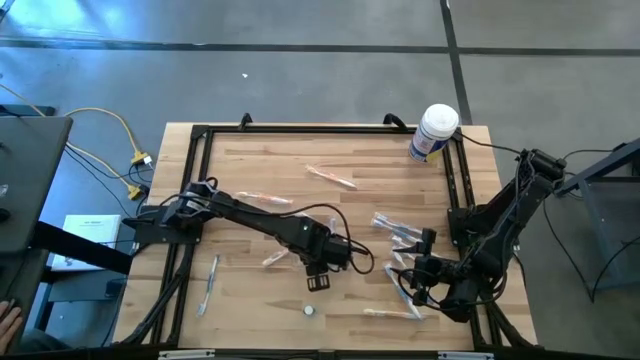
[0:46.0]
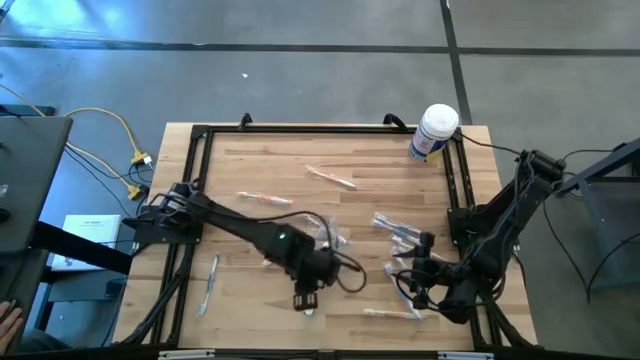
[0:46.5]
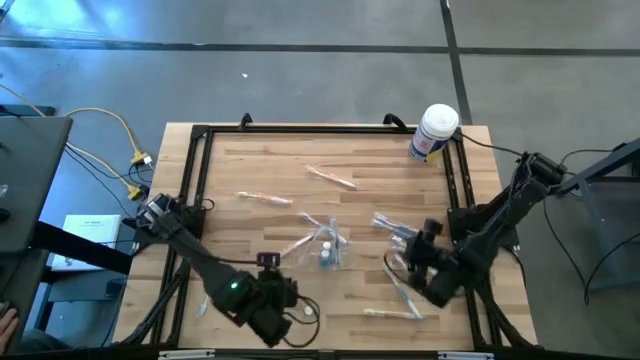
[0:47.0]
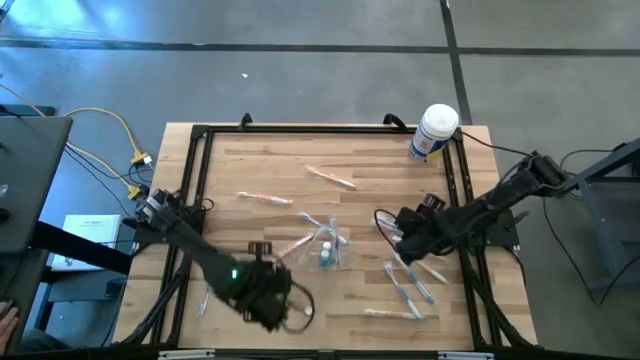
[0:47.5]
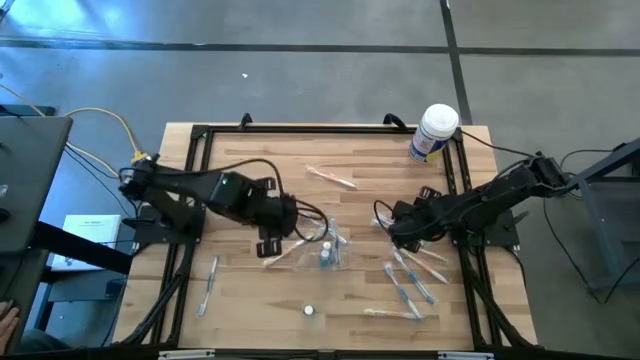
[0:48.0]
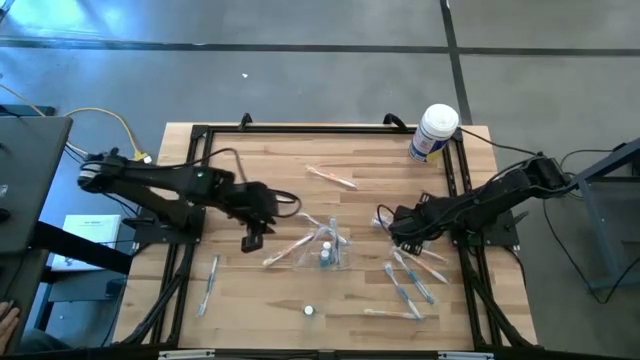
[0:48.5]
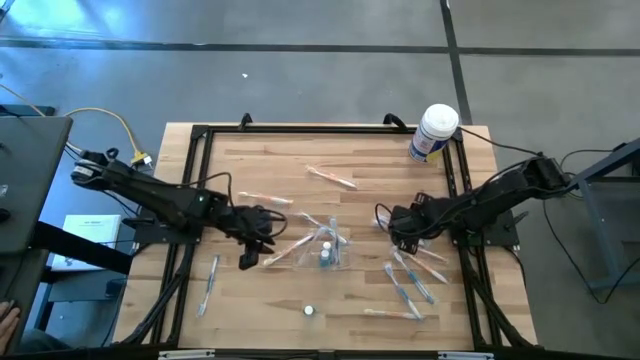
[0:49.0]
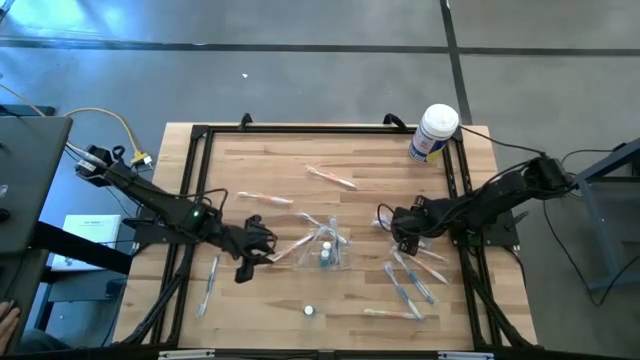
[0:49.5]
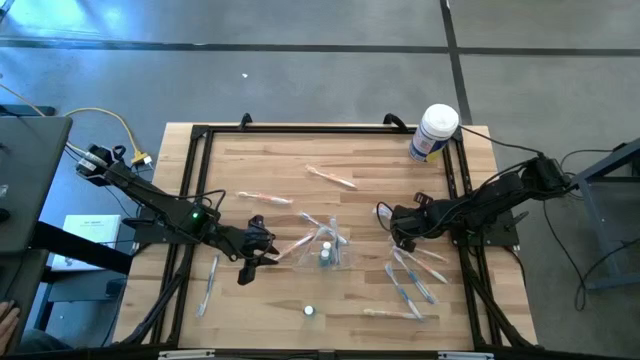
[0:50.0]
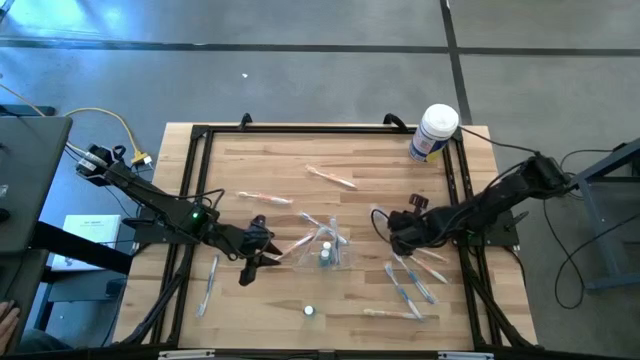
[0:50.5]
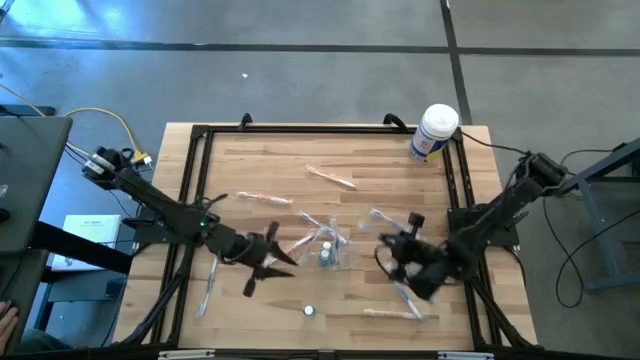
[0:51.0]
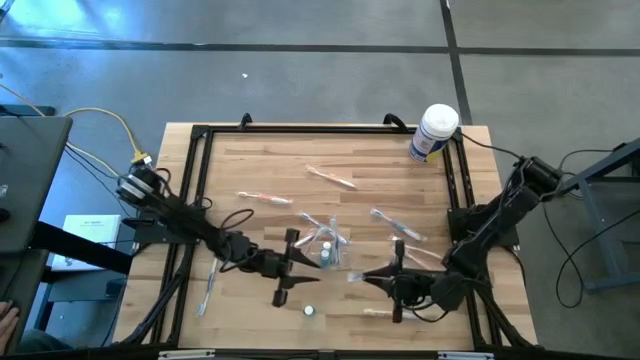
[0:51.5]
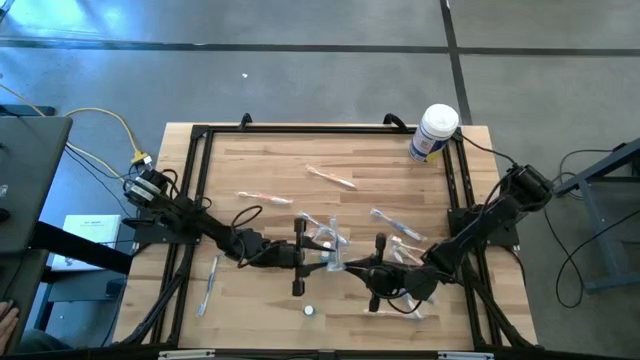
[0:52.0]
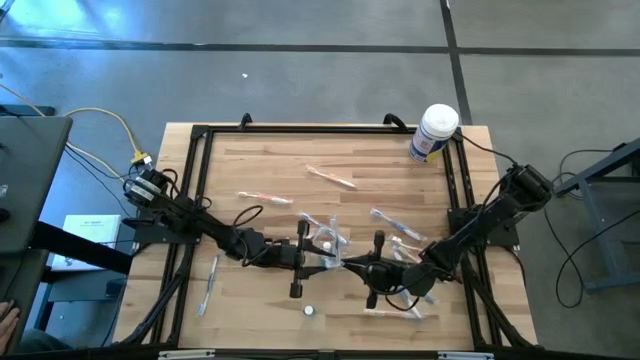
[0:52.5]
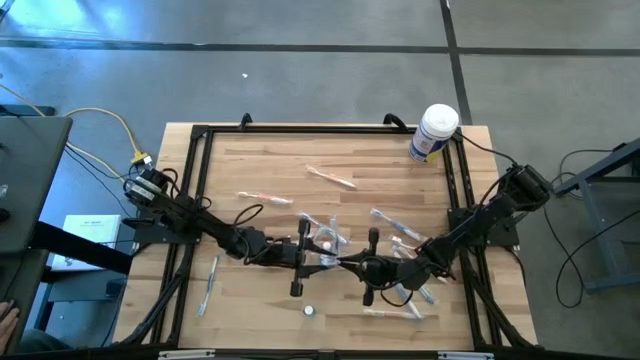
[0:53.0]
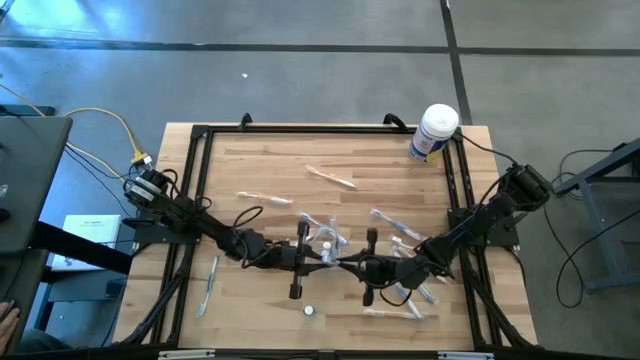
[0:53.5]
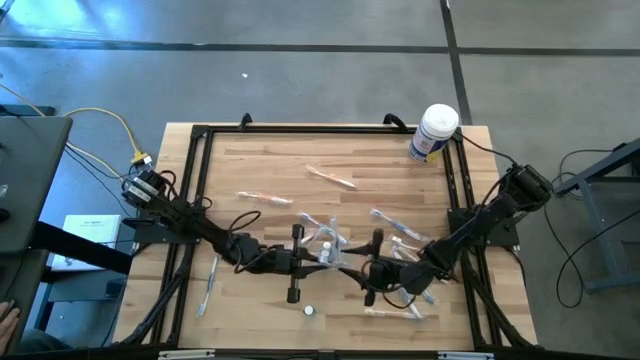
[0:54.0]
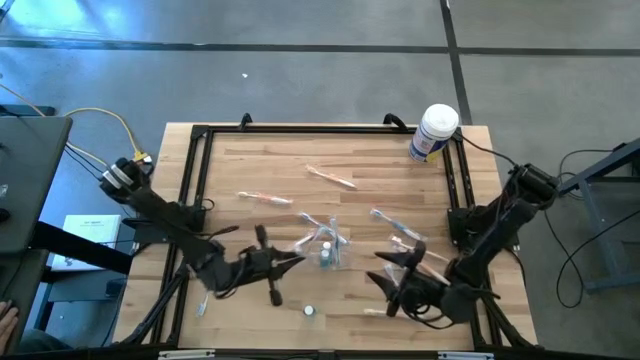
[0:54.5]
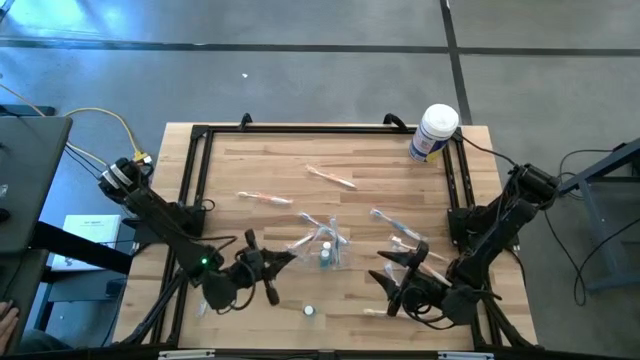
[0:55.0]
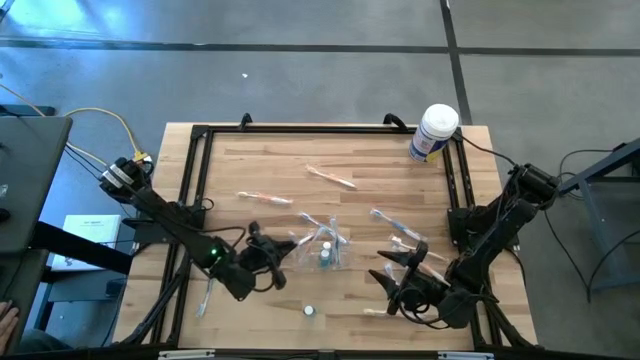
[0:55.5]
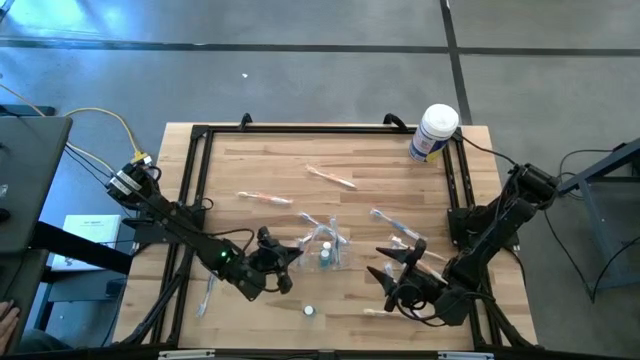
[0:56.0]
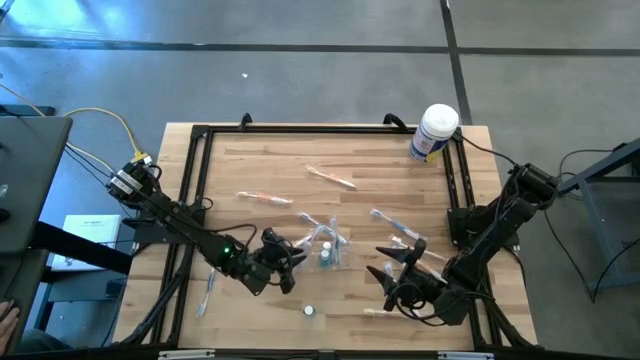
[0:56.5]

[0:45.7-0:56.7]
Task: Pick & Place toothbrushing station
Put the blue toothbrush into the transparent organizer

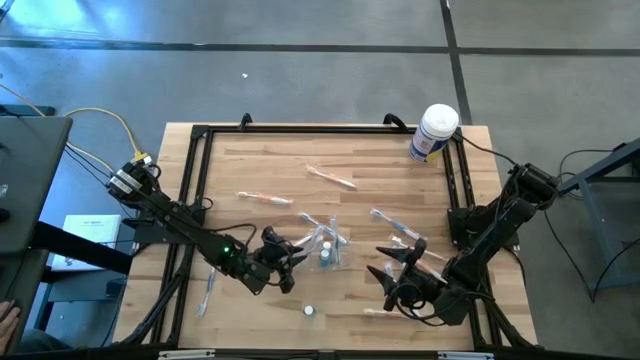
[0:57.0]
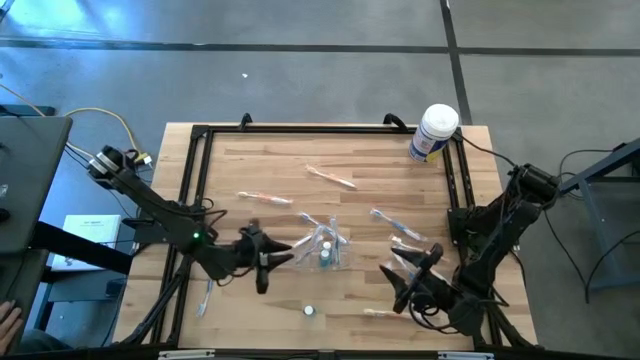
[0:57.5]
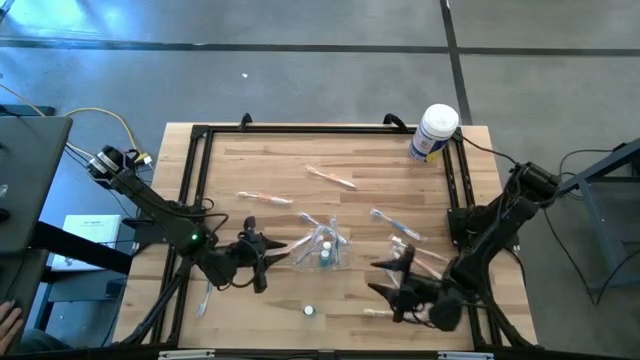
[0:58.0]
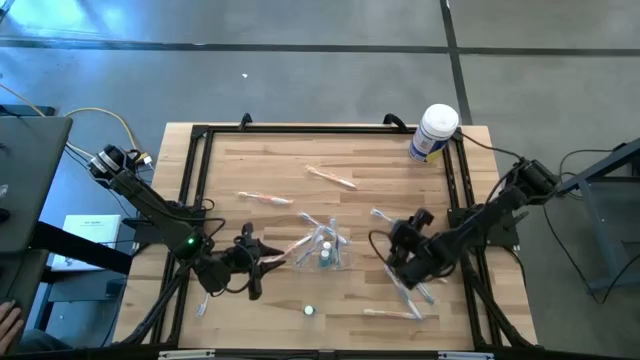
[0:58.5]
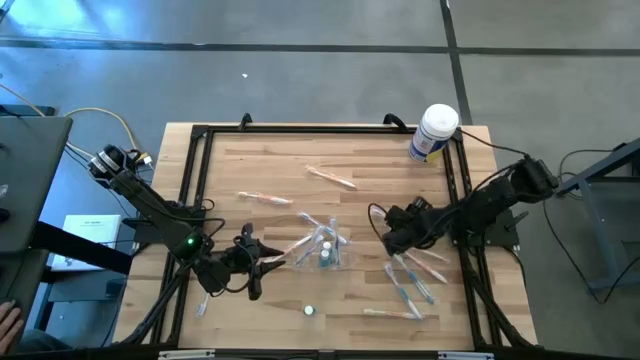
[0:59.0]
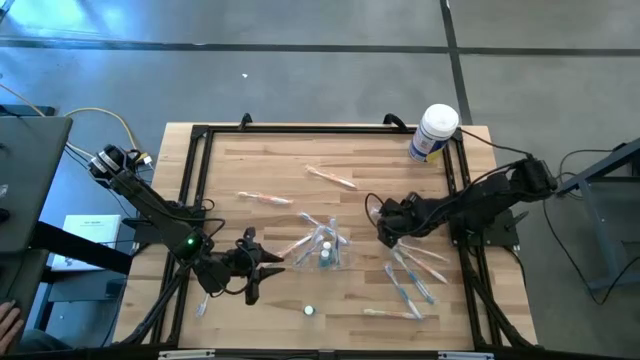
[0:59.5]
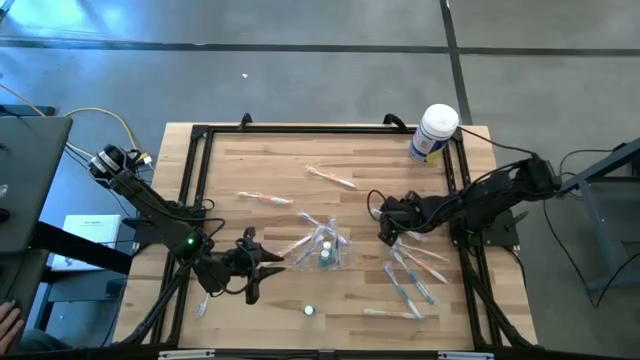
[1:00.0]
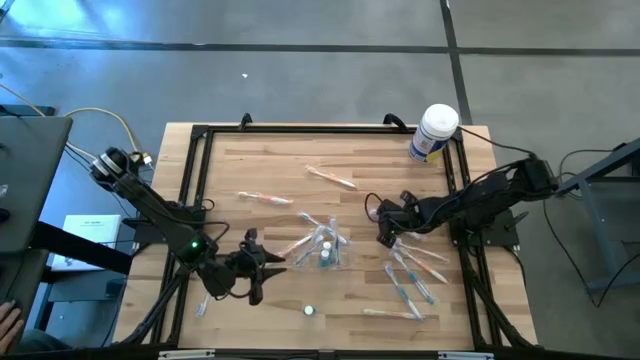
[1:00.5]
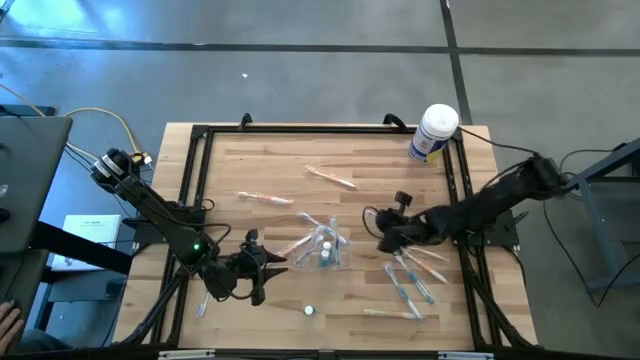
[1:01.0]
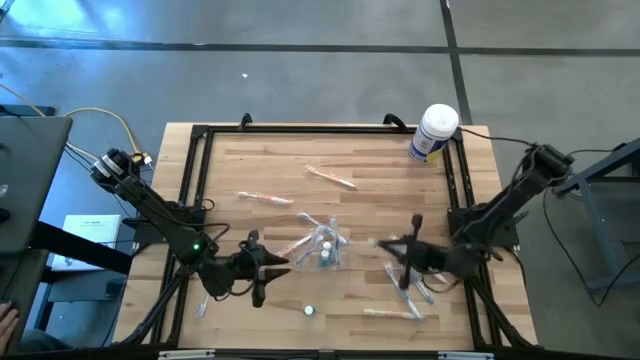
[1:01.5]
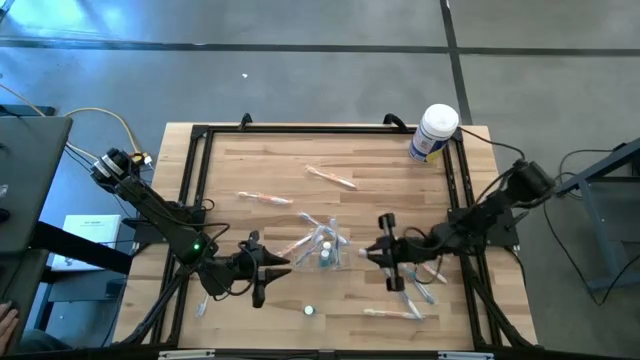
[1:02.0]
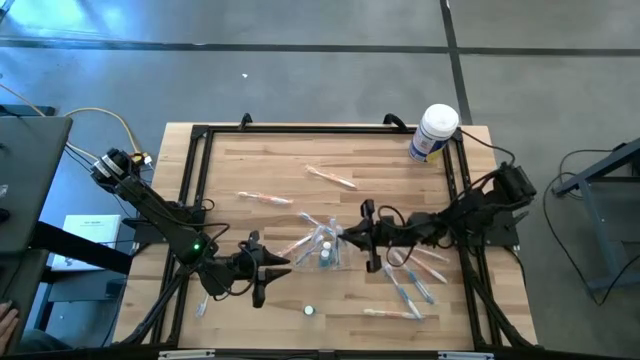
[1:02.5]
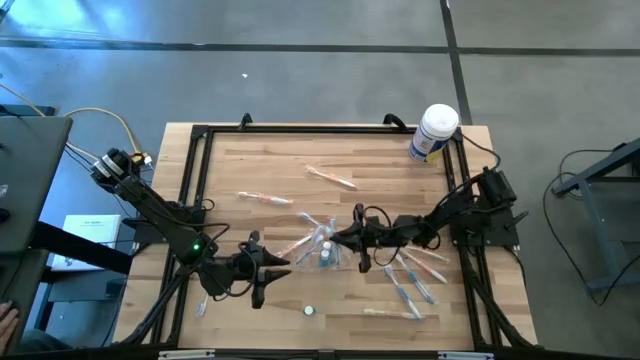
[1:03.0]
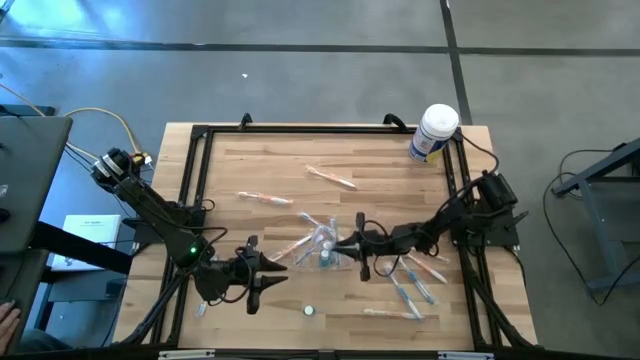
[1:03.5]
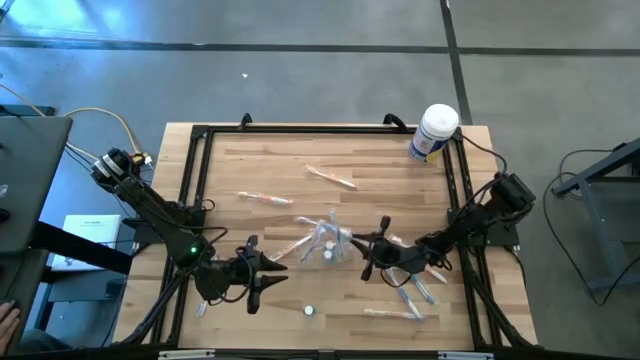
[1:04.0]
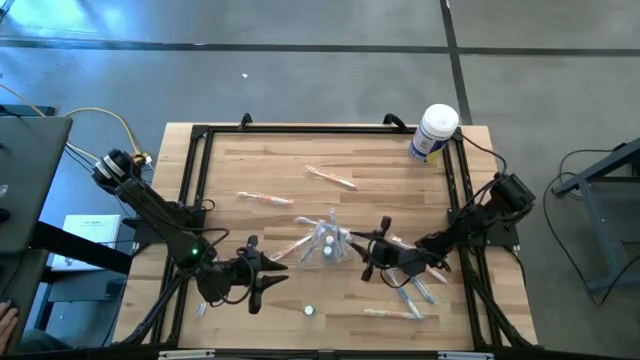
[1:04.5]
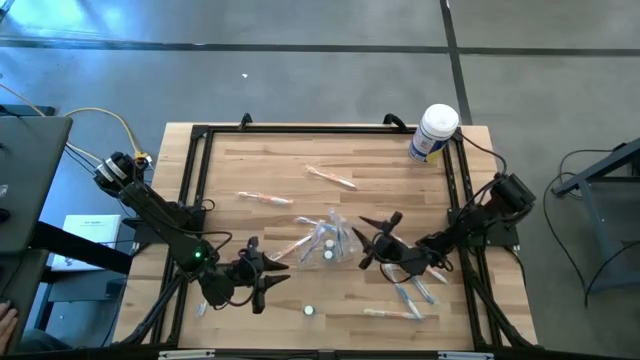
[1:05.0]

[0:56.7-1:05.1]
Put the blue toothbrush into the transparent organizer

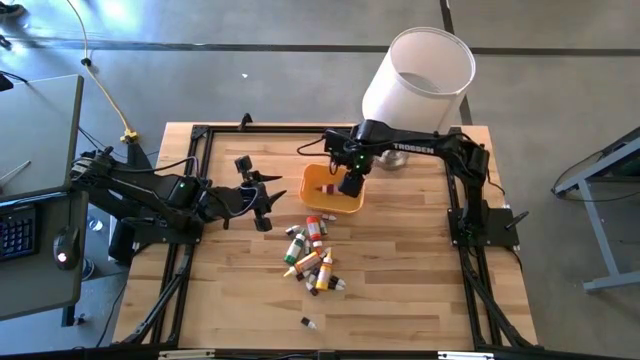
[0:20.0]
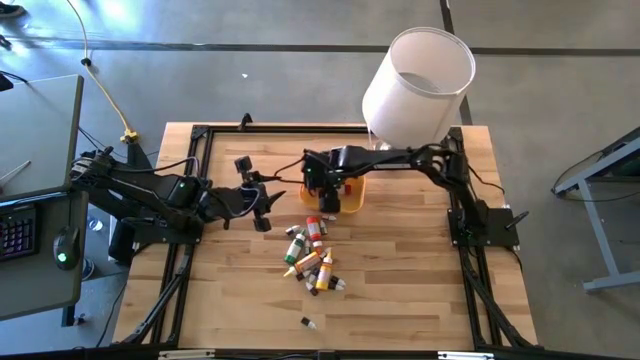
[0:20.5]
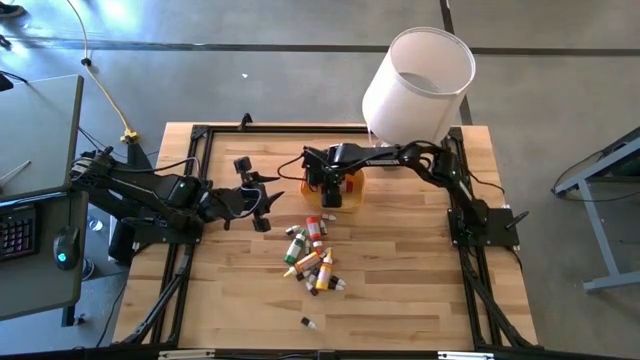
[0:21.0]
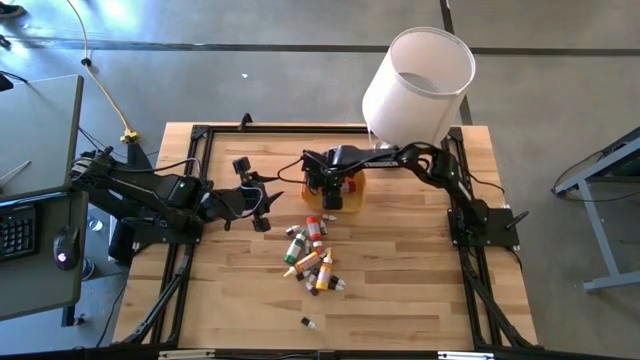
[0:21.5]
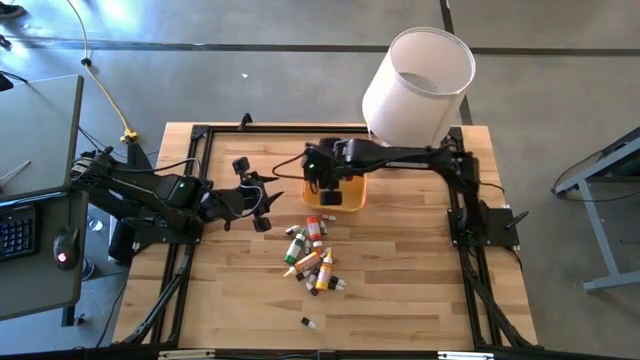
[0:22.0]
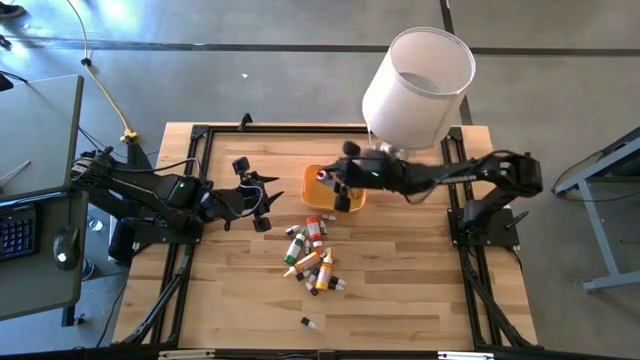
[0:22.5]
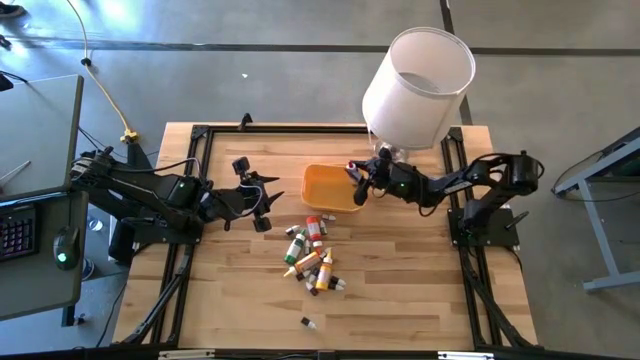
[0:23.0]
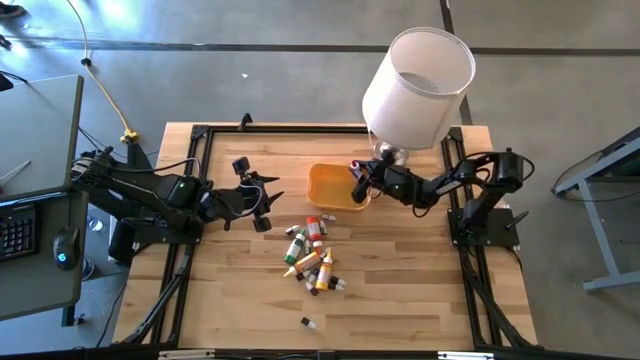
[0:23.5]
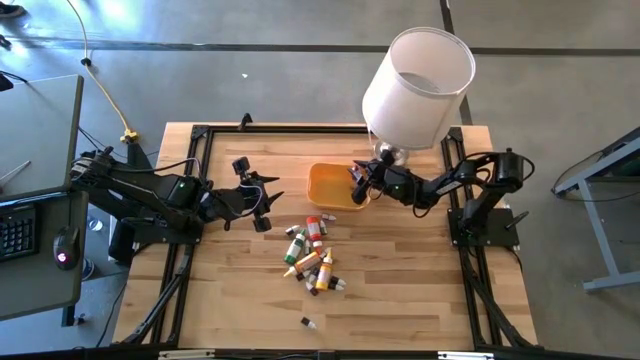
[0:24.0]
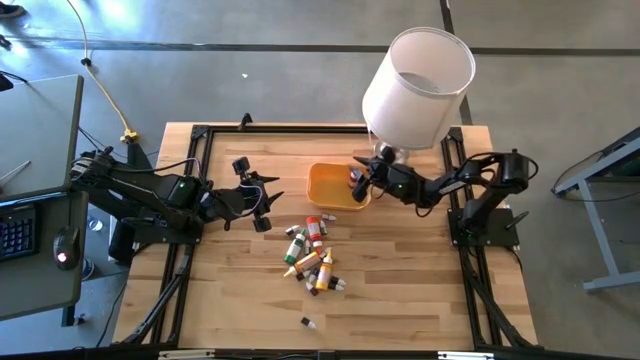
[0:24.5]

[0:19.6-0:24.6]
Task: Pick & Place food coloring
Put the large red food coloring bottle into the yellow container
